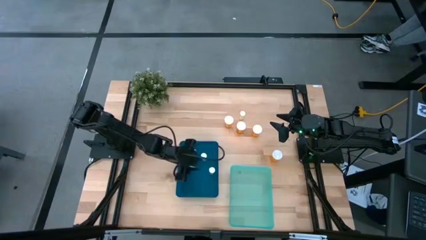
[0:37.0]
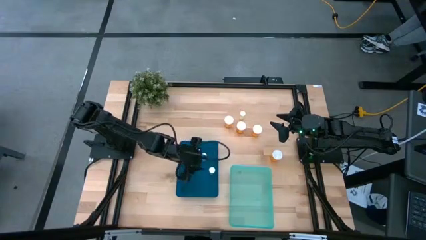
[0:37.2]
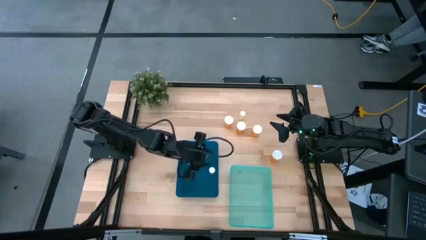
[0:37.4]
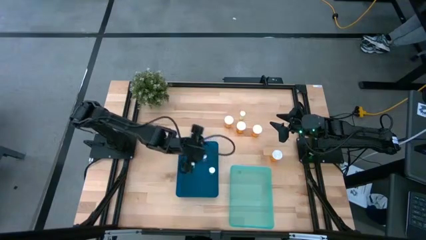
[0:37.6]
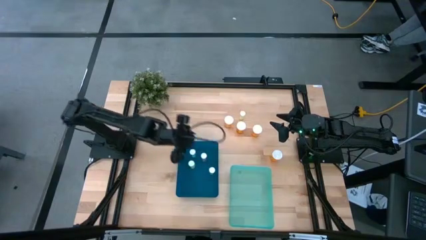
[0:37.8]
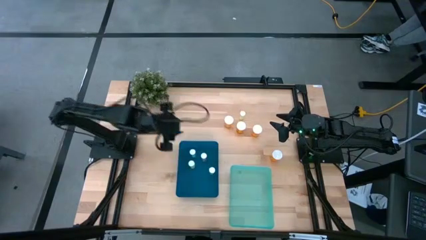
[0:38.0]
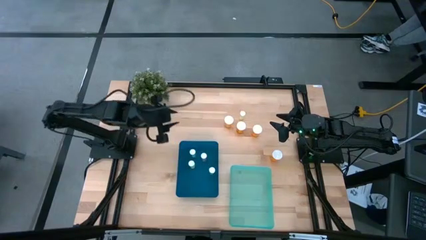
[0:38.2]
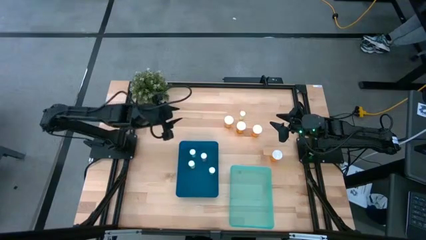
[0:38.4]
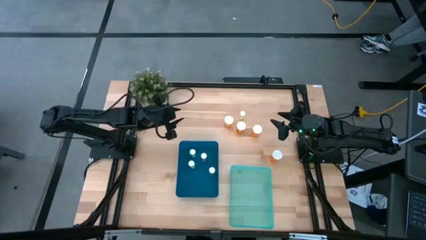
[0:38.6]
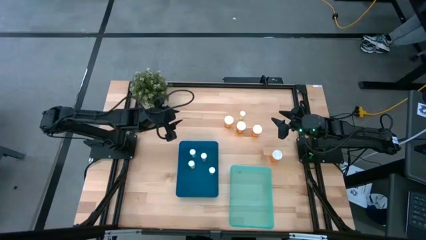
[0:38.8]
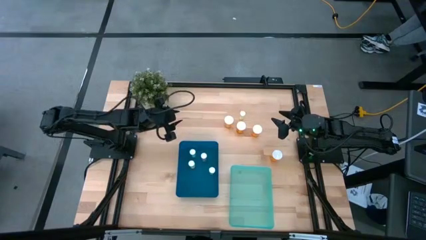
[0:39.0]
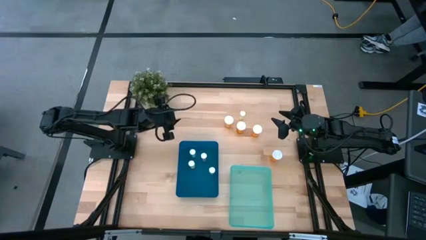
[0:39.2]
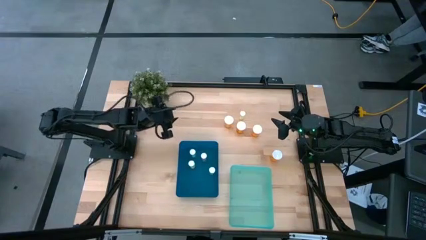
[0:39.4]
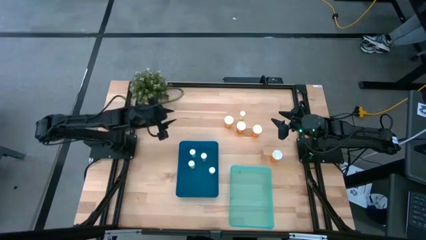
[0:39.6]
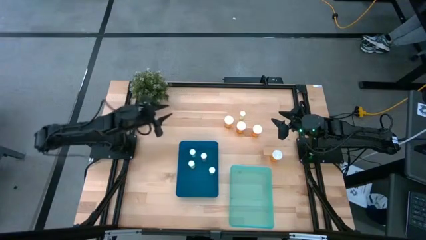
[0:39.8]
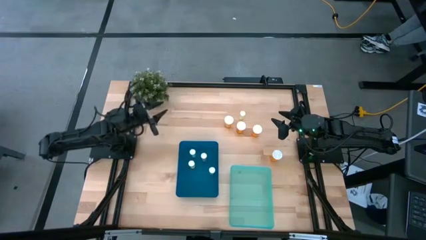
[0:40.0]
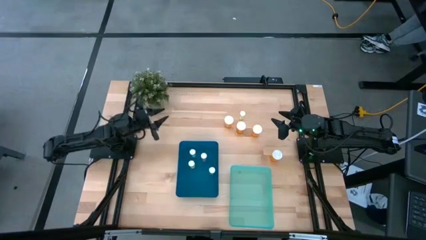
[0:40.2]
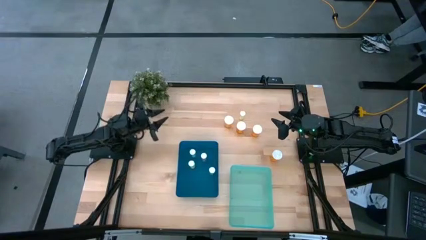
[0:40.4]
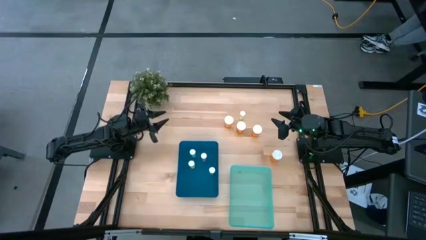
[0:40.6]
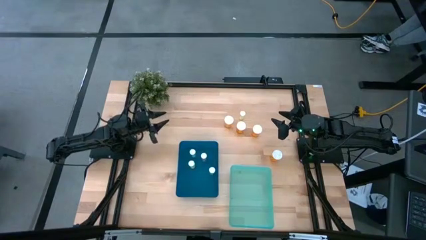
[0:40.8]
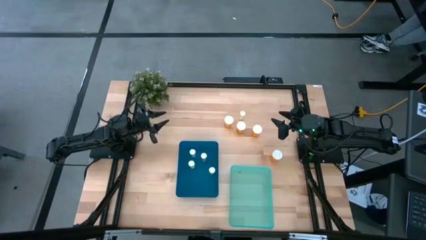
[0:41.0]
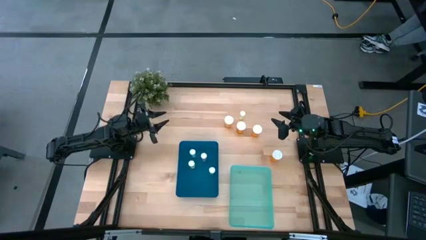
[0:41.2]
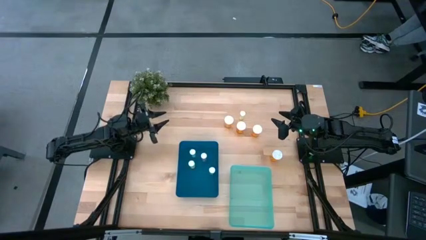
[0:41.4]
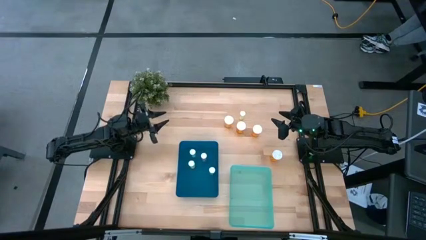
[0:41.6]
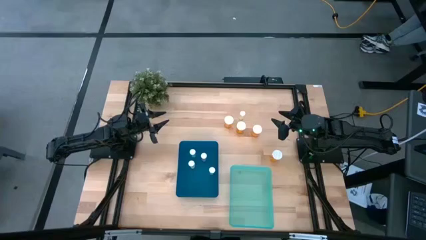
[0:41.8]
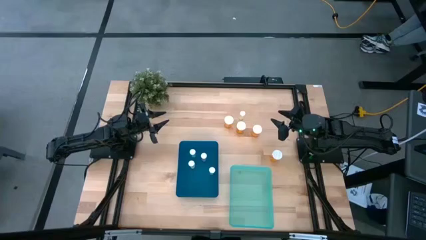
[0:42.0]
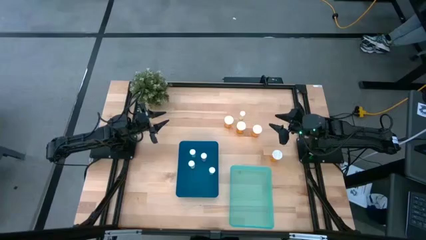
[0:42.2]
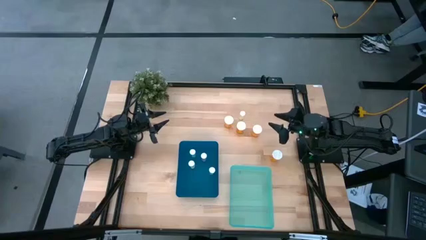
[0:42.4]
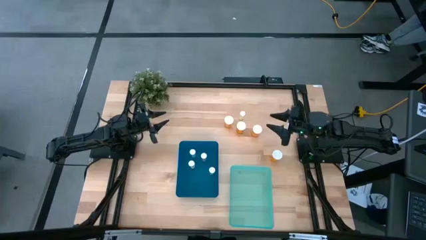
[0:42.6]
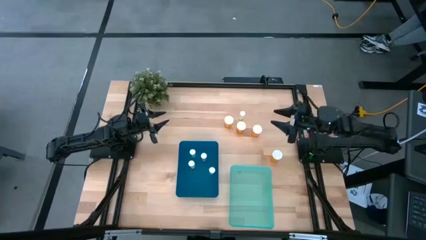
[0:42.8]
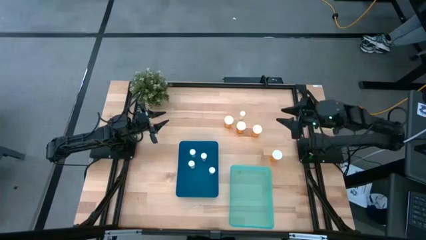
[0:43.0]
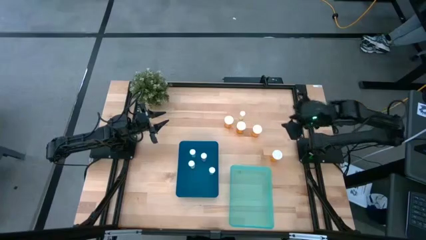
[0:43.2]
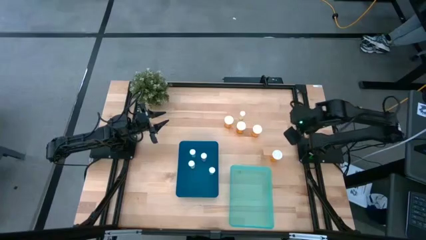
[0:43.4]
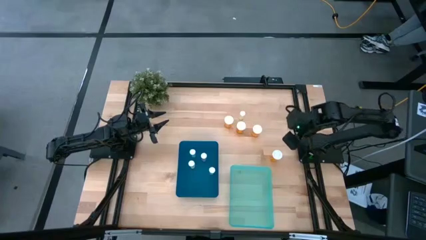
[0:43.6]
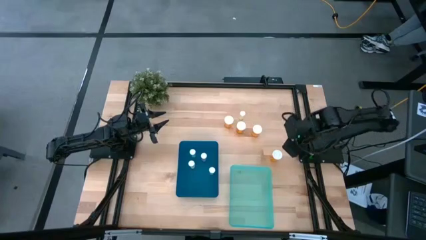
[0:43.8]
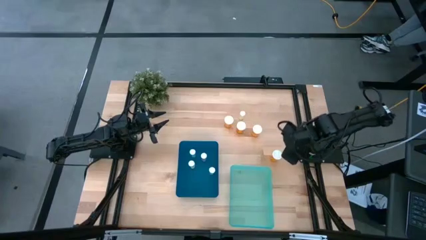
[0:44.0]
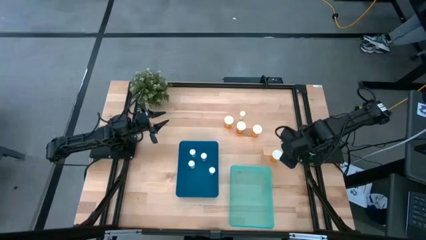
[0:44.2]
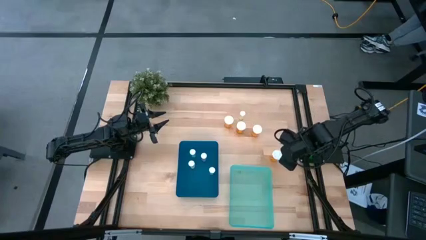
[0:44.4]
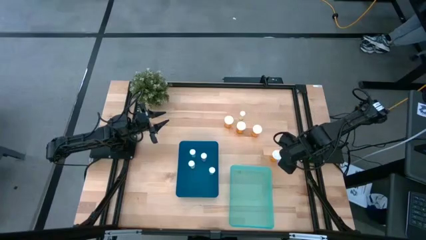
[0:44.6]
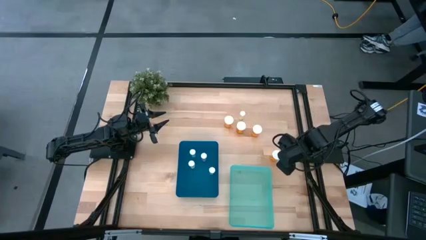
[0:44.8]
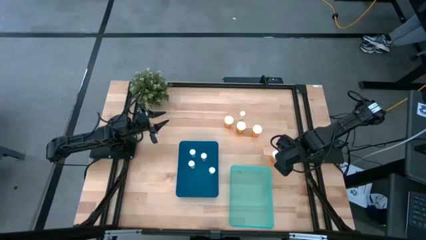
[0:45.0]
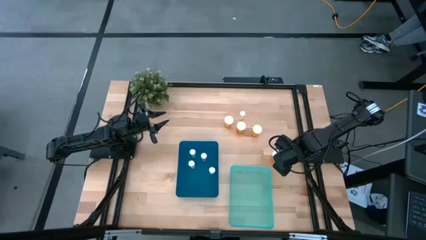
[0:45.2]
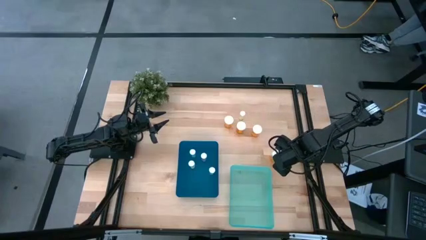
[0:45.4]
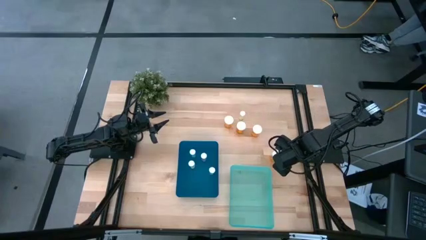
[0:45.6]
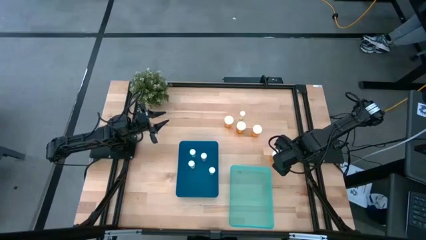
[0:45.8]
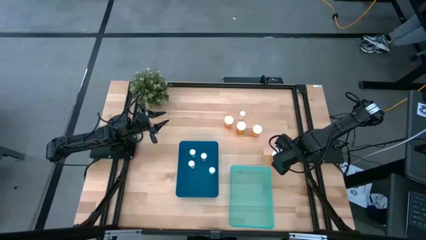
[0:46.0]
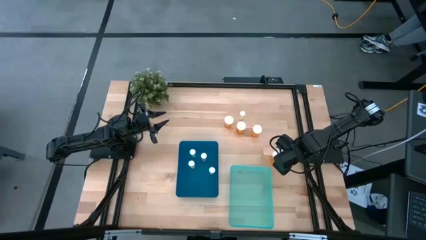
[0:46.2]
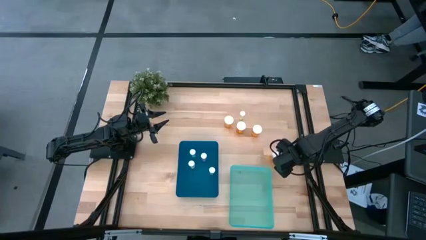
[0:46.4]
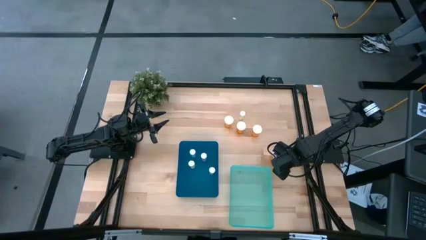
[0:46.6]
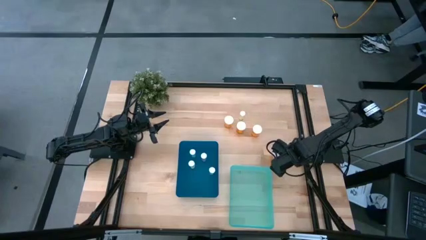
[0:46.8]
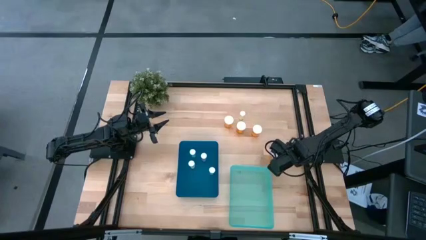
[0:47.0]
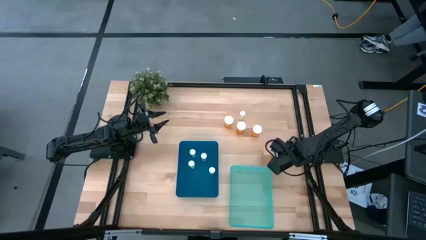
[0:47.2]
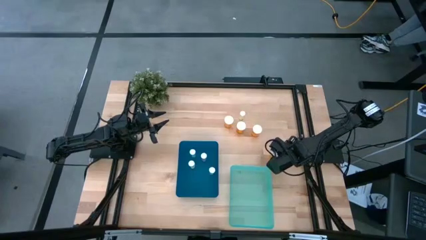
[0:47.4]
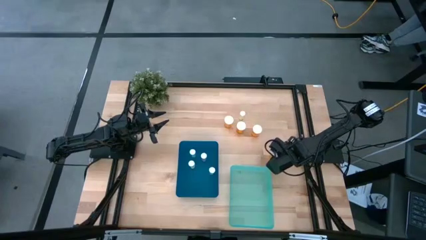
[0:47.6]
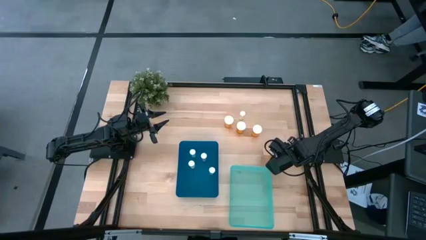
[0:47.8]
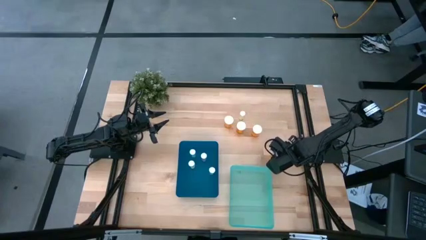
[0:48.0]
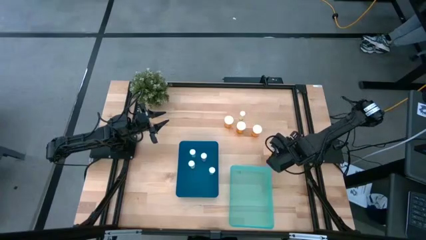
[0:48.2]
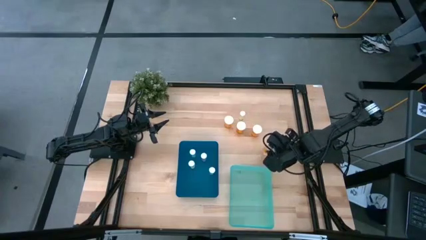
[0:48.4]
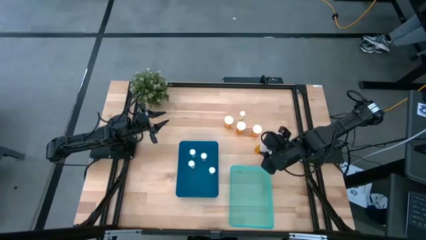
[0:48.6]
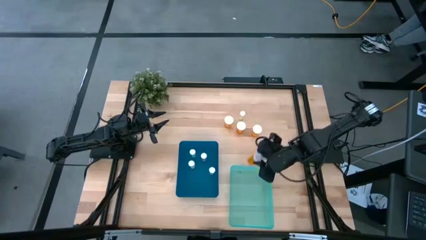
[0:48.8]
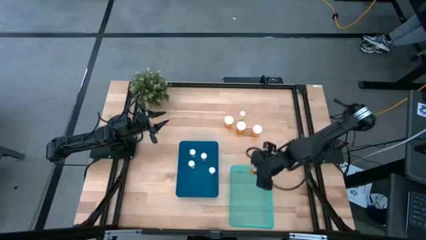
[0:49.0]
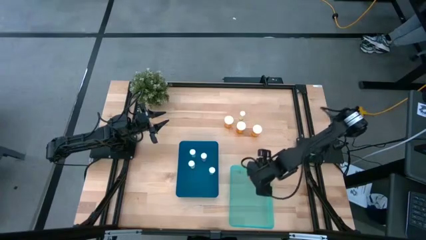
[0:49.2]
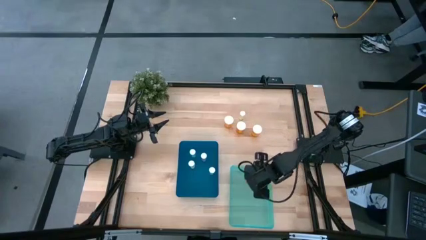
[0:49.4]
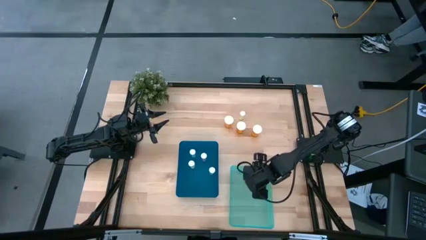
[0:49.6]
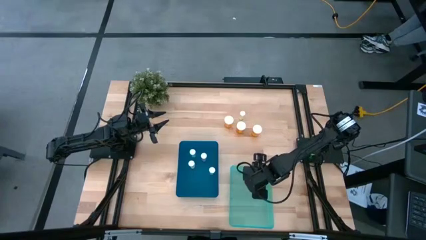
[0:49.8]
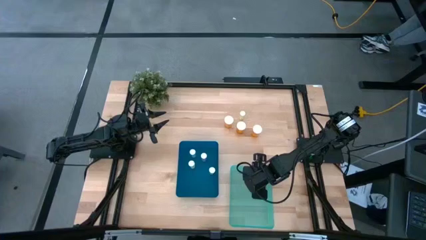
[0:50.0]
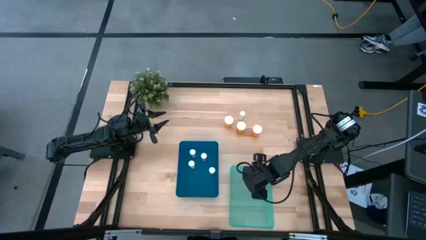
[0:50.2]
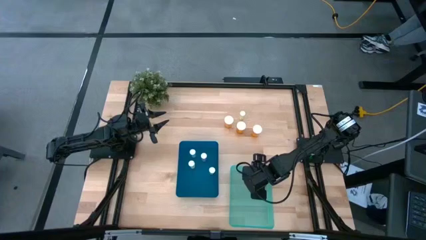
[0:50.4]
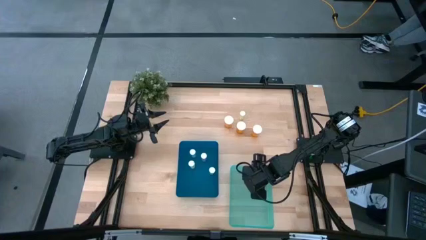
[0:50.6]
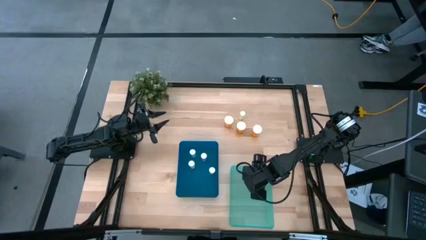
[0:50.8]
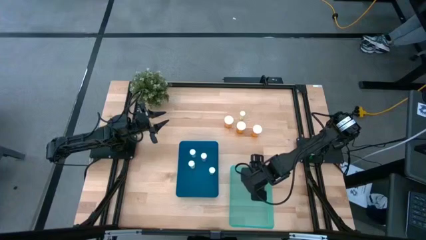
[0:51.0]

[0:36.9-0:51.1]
Task: Pick and place medicine bottles into bin by pill shape (circle, oval)
Put the right orange pill bottle into the light blue bin
